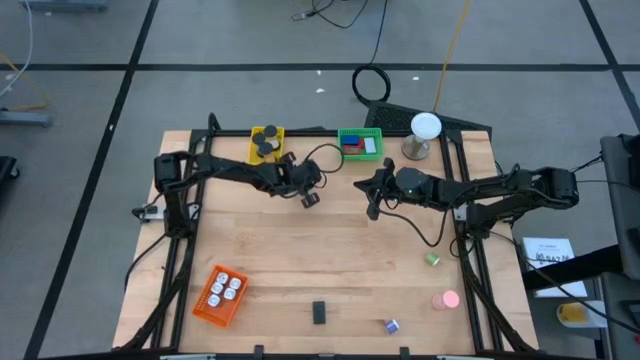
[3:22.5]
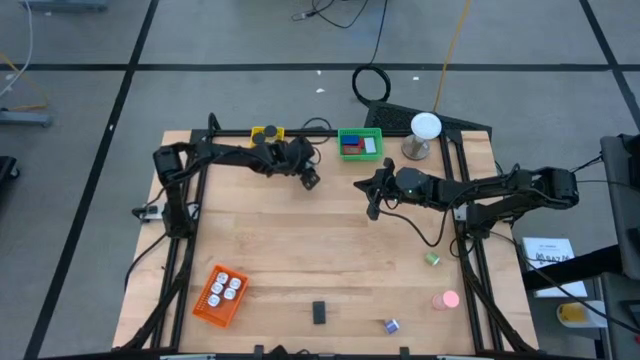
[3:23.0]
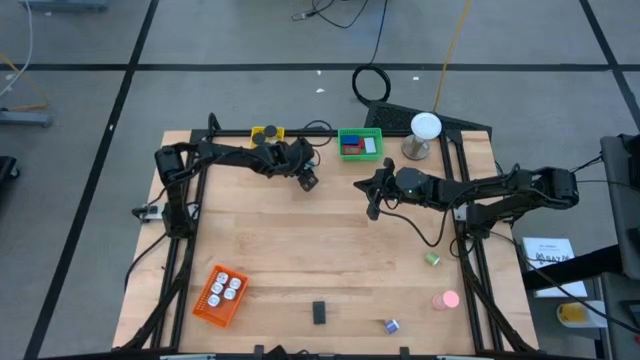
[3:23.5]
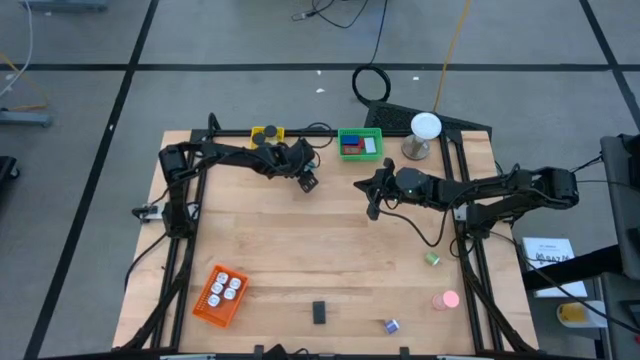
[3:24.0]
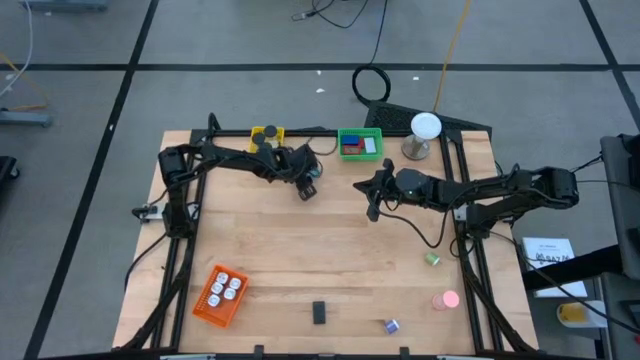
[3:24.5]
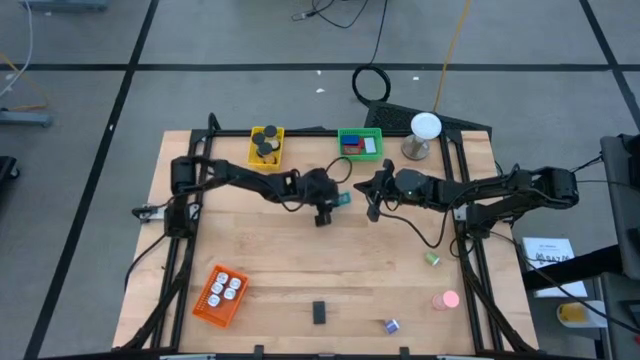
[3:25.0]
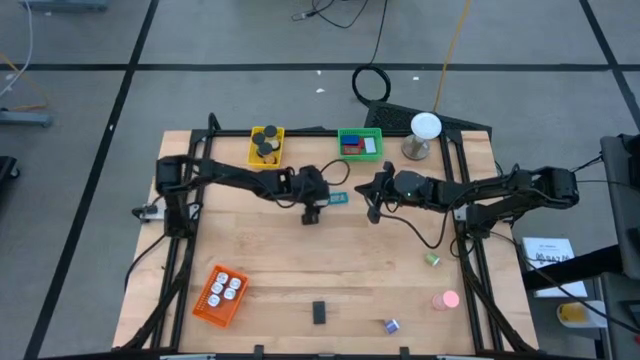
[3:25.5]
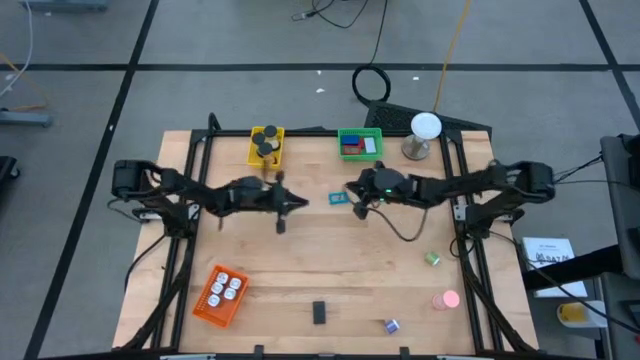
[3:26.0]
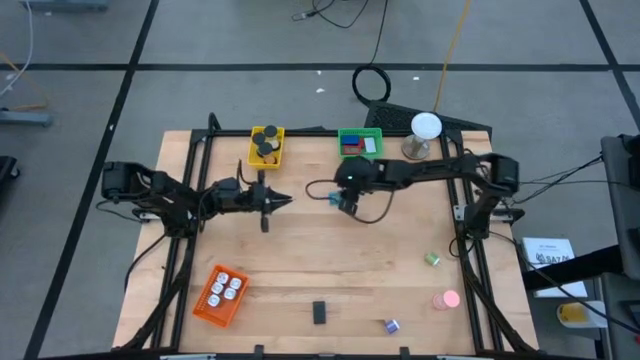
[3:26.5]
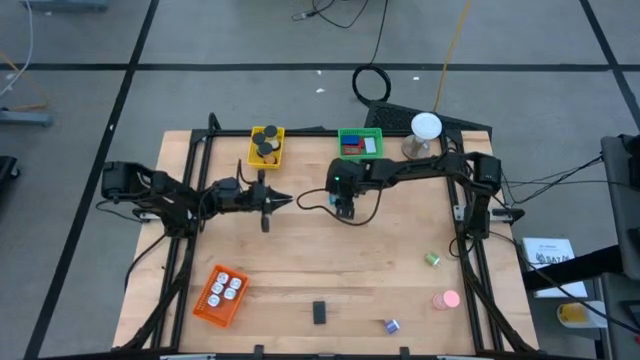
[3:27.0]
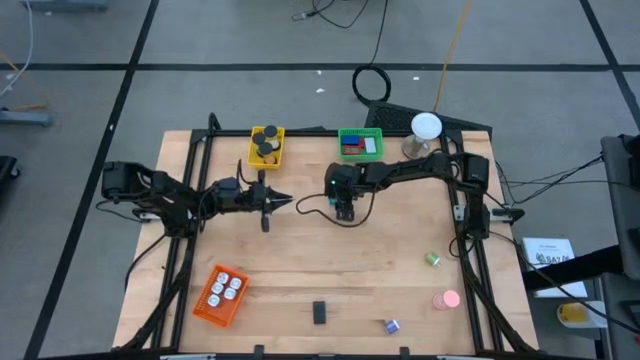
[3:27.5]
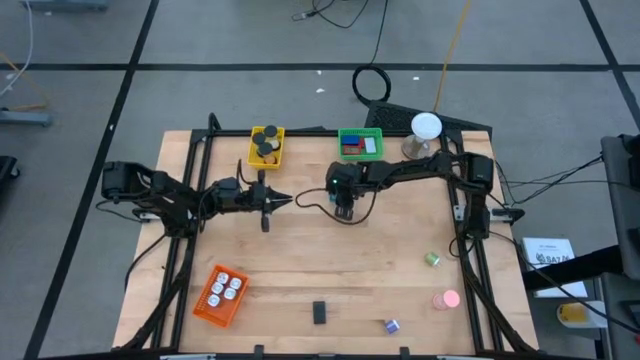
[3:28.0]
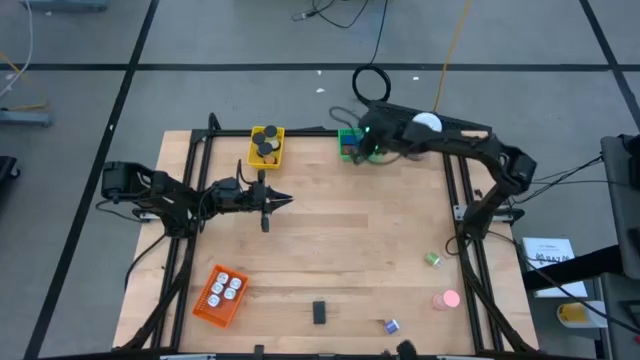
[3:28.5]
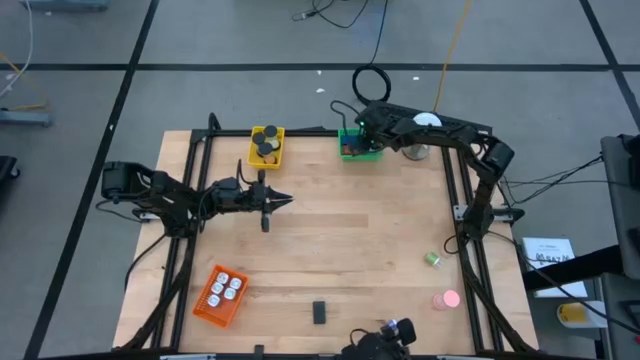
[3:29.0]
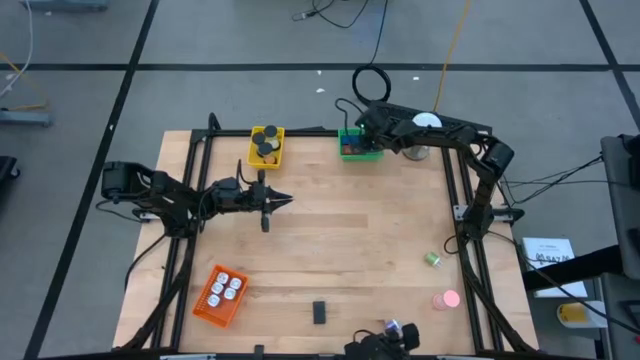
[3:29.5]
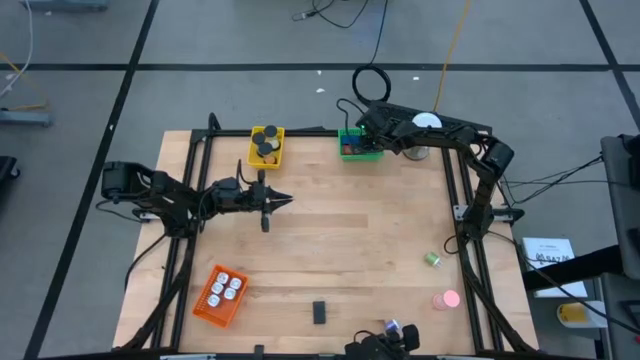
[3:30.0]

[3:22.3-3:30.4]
Task: Pick & Place Office items
Put the light blue digital clock into the green bin

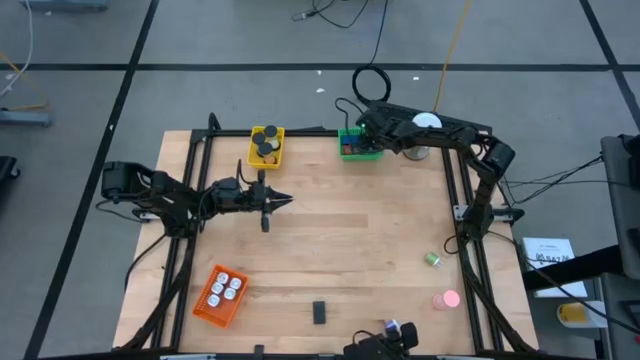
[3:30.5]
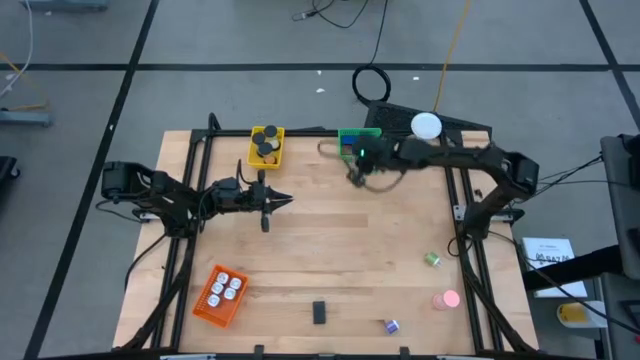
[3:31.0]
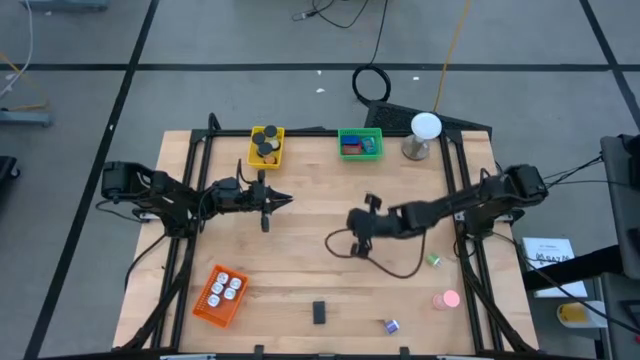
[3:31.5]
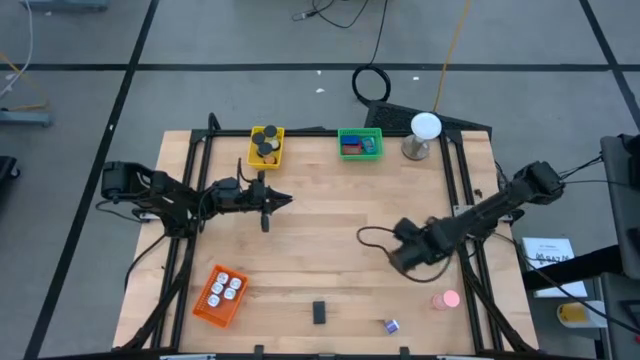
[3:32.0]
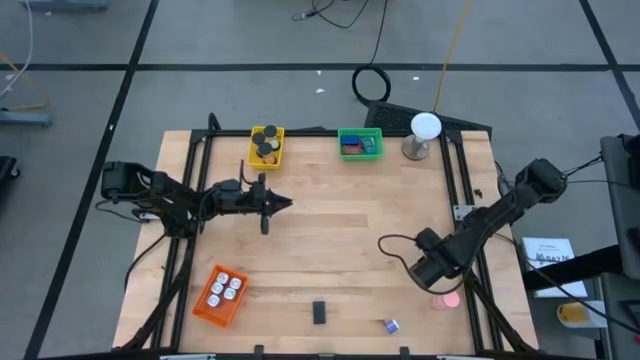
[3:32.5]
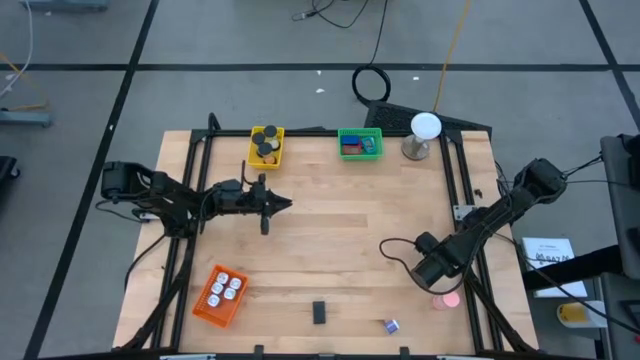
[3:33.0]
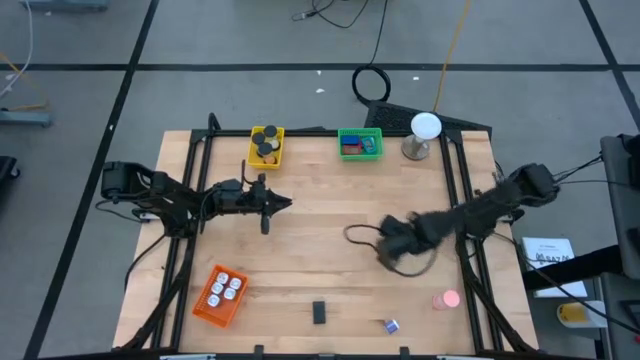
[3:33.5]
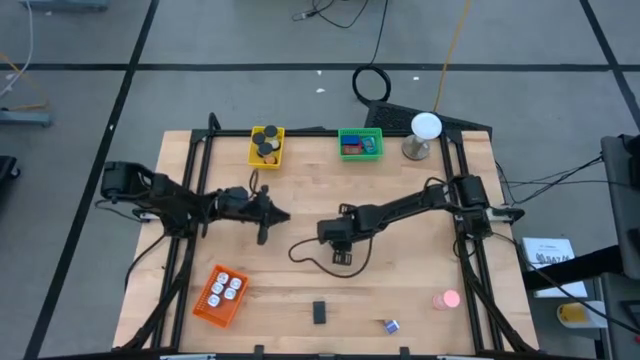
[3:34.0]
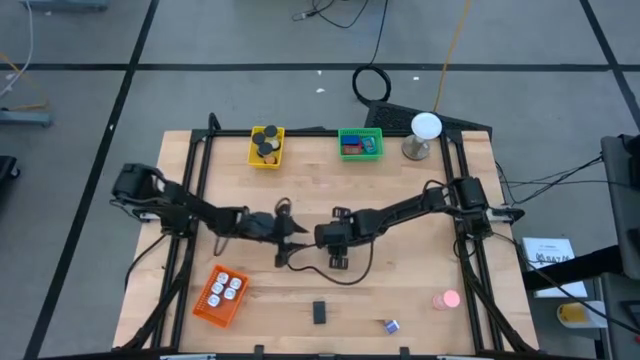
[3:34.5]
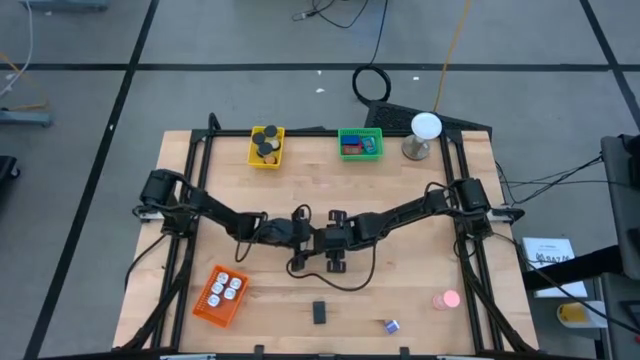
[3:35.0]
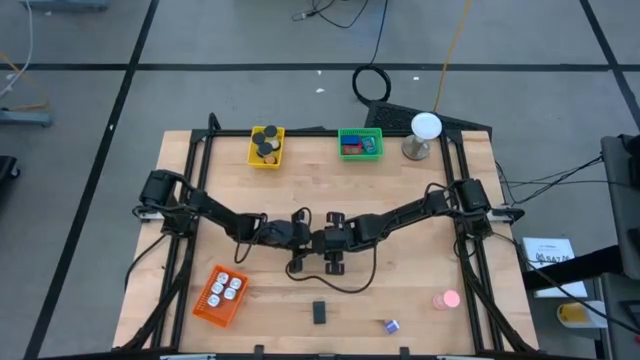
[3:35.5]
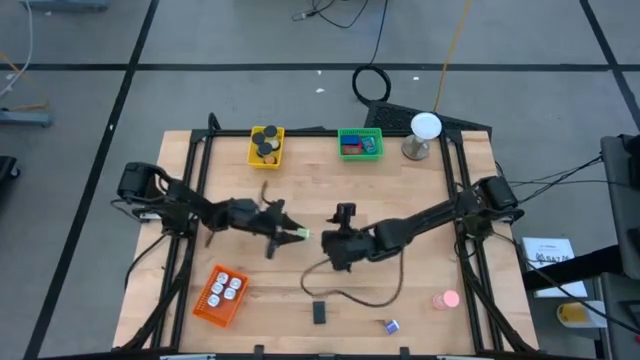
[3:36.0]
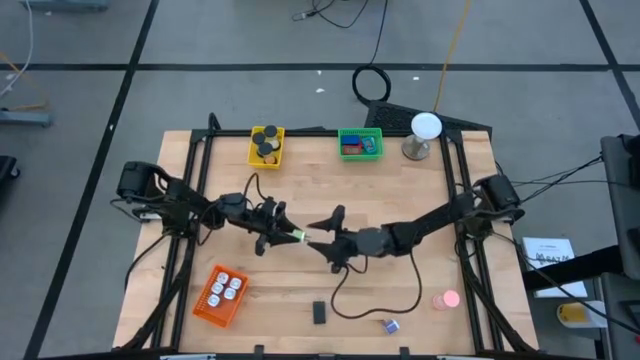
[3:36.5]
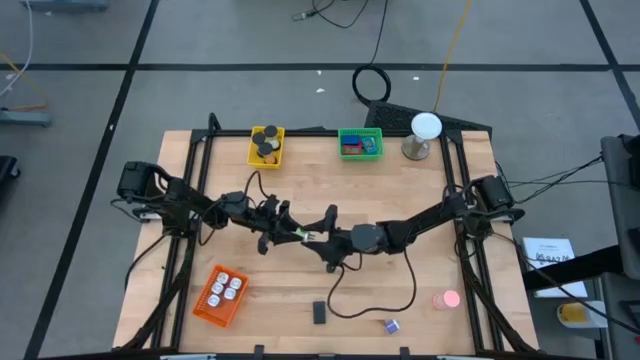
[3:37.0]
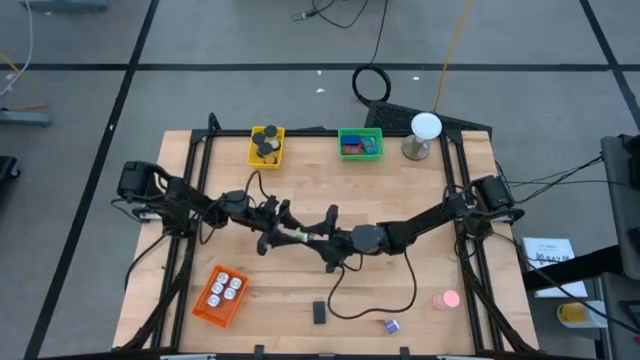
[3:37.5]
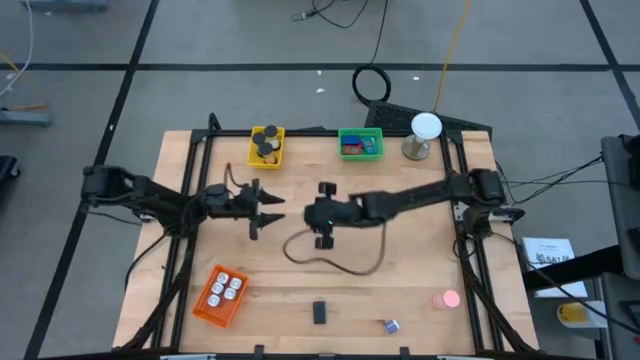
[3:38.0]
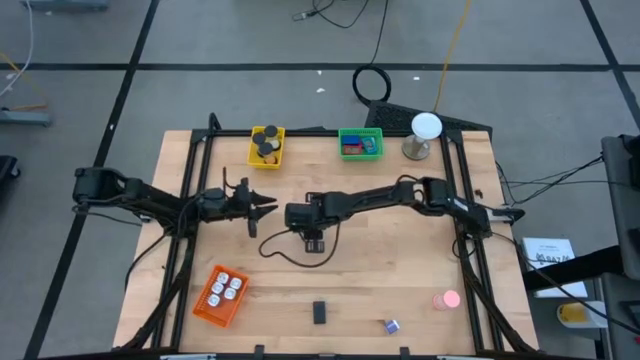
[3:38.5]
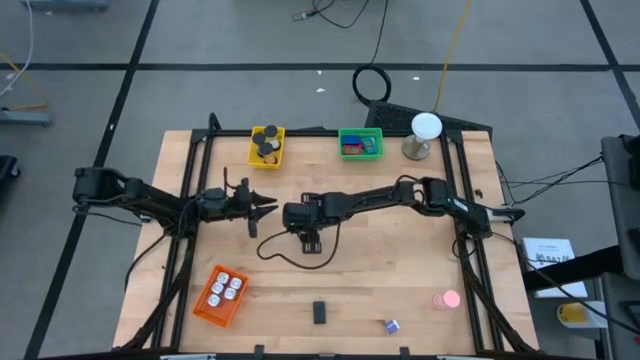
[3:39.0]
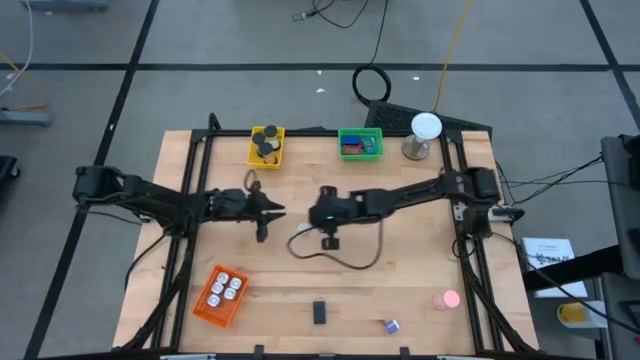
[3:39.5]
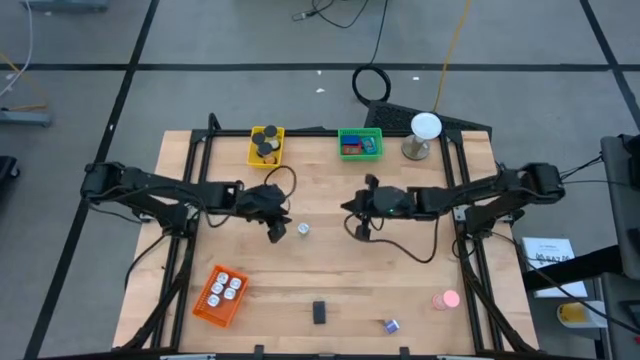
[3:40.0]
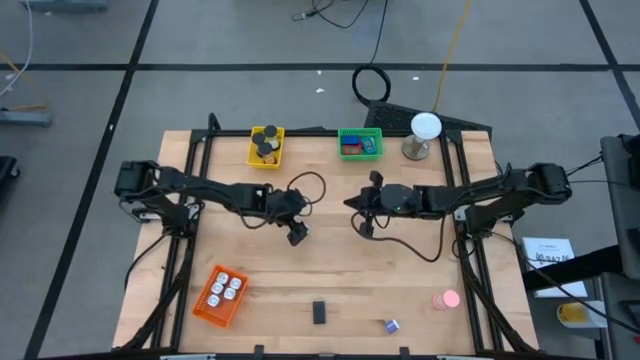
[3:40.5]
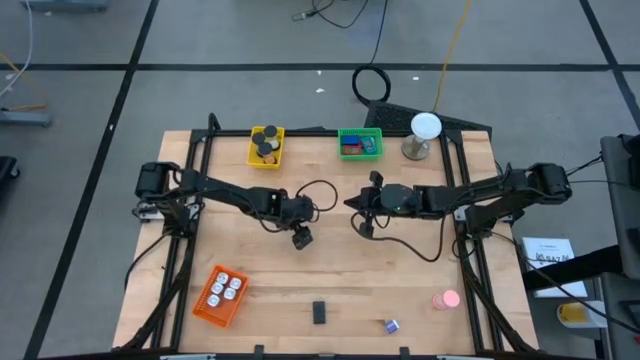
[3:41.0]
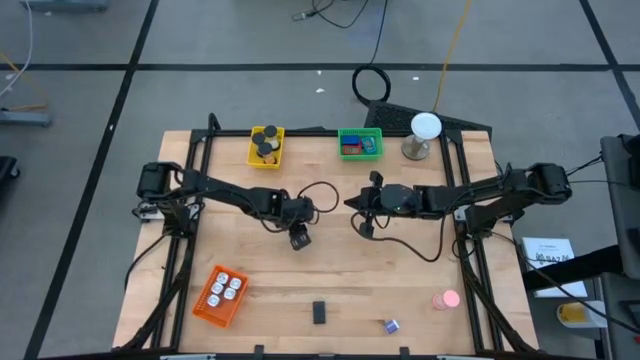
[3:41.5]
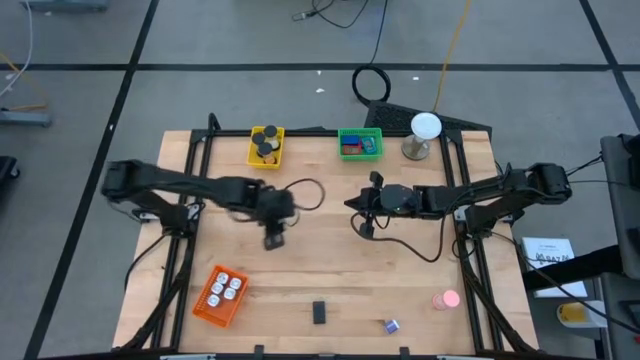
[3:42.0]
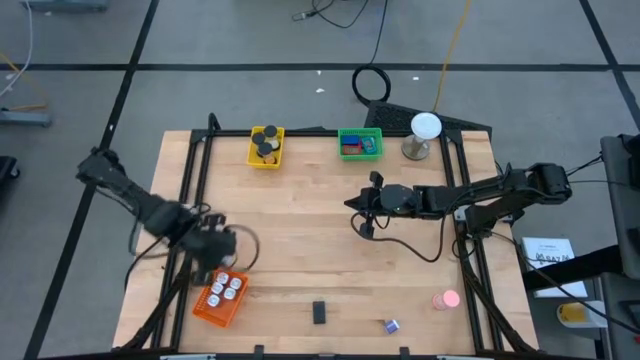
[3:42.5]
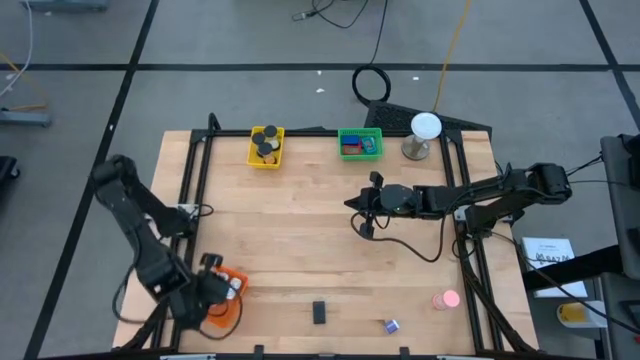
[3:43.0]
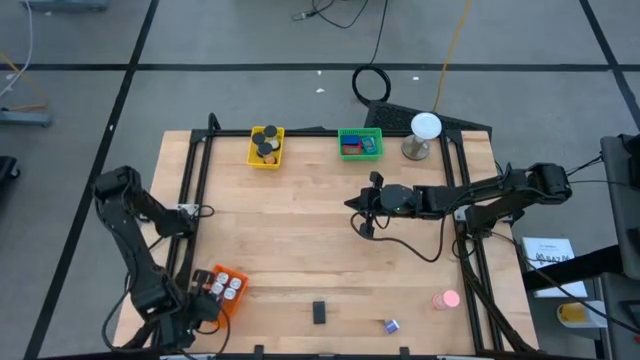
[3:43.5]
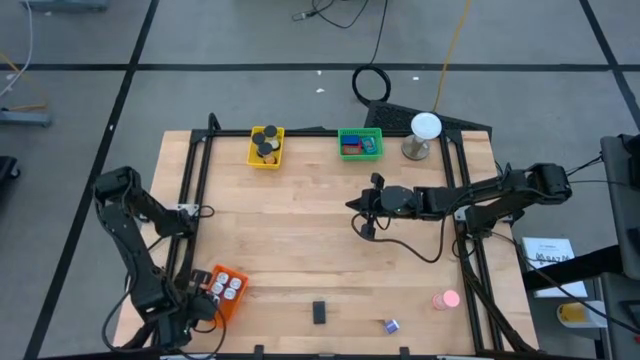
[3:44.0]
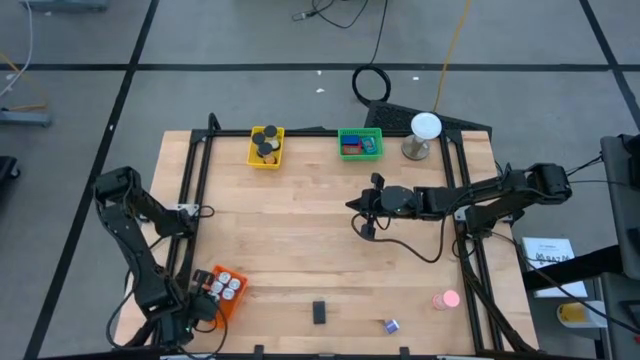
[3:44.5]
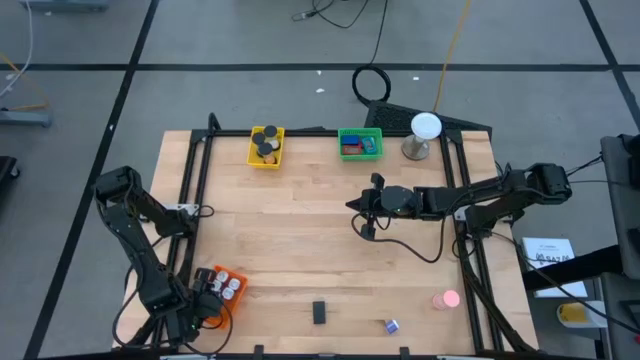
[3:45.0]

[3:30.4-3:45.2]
Put the green charger adapter into the orange bin
